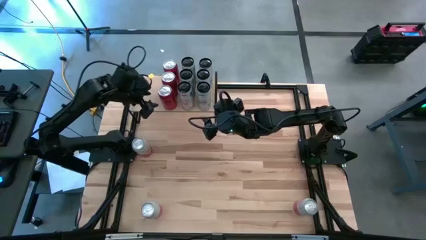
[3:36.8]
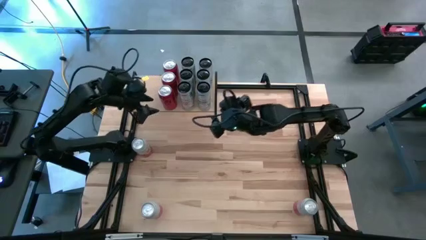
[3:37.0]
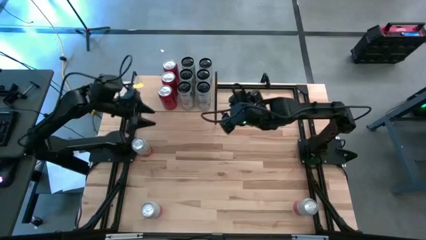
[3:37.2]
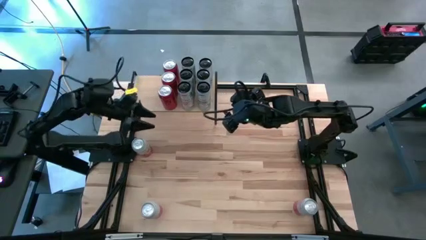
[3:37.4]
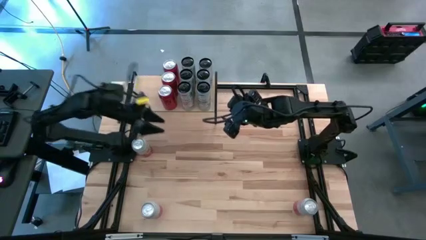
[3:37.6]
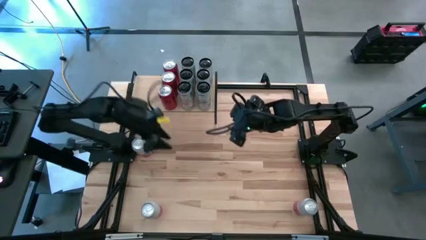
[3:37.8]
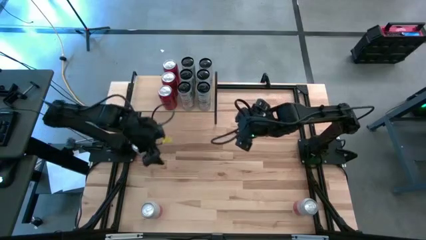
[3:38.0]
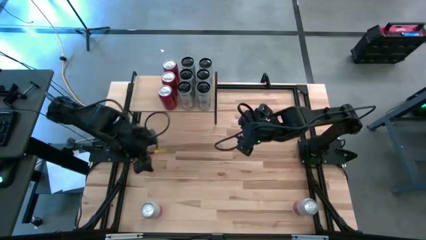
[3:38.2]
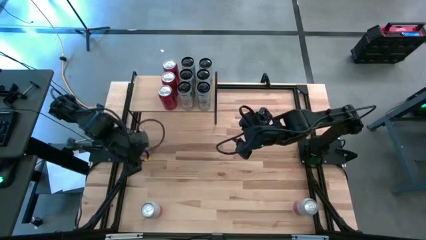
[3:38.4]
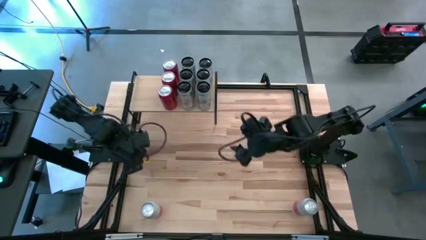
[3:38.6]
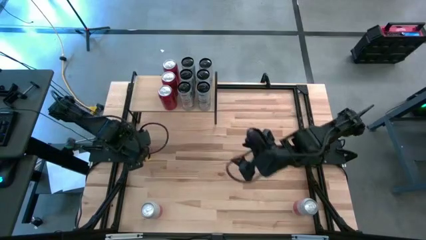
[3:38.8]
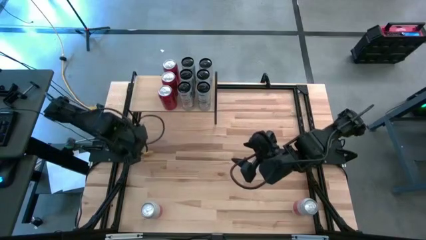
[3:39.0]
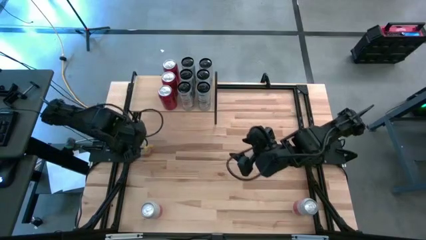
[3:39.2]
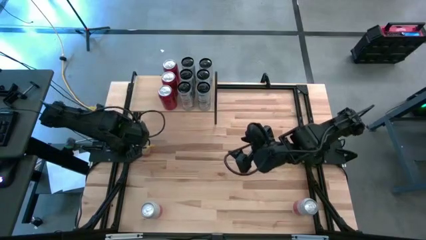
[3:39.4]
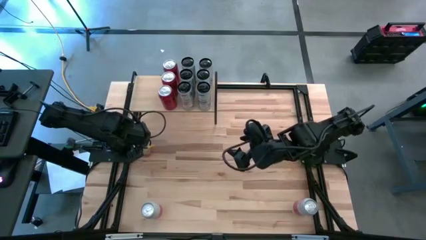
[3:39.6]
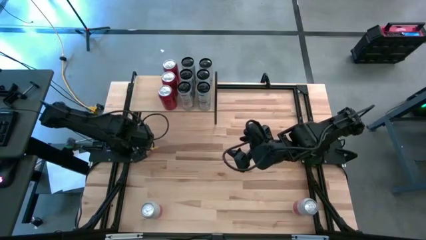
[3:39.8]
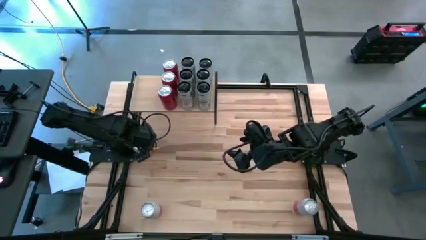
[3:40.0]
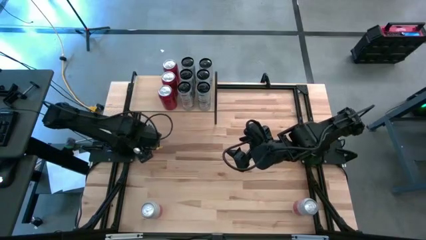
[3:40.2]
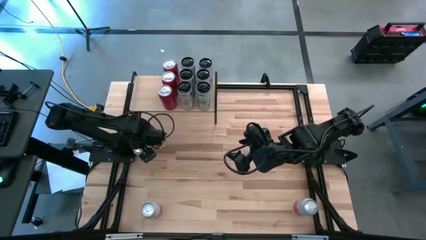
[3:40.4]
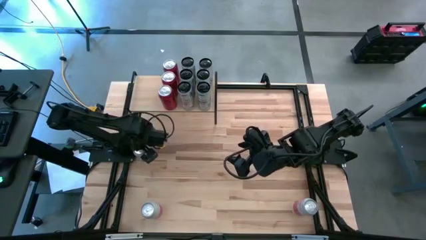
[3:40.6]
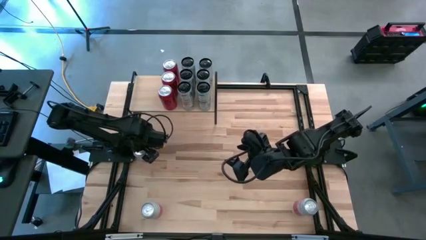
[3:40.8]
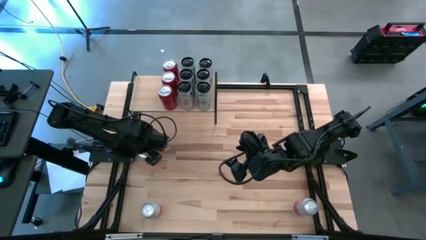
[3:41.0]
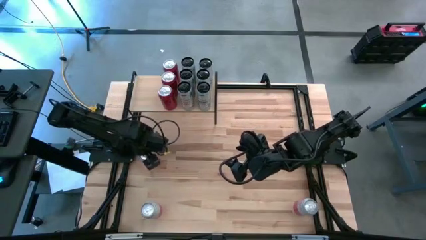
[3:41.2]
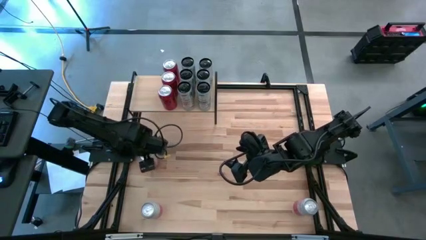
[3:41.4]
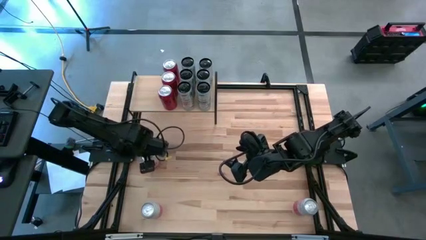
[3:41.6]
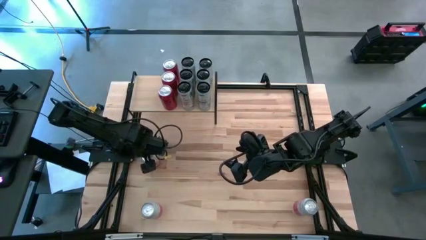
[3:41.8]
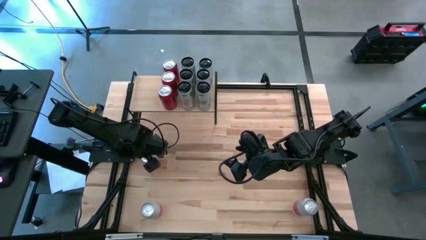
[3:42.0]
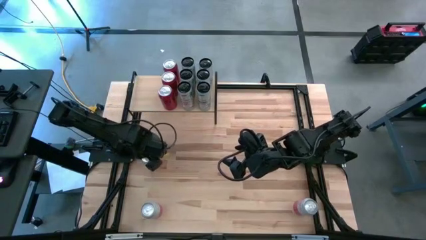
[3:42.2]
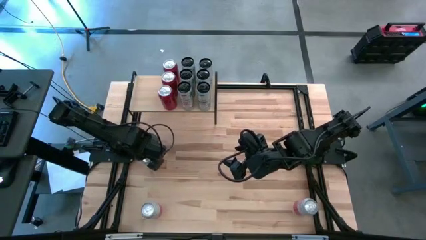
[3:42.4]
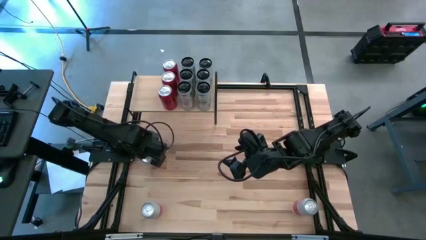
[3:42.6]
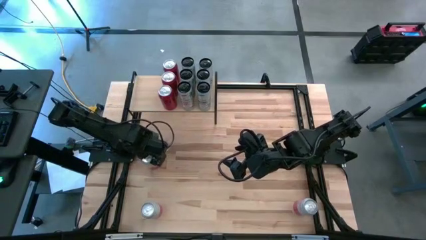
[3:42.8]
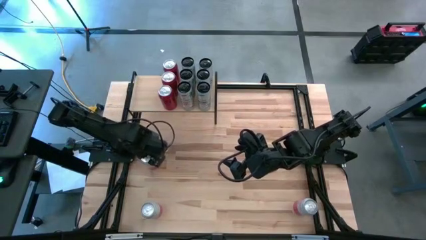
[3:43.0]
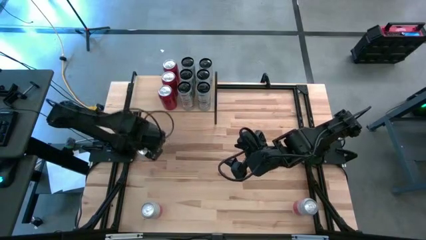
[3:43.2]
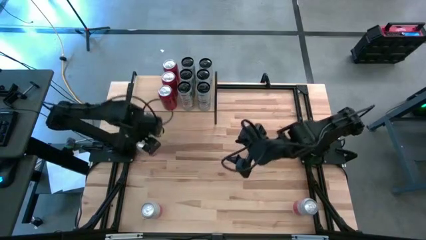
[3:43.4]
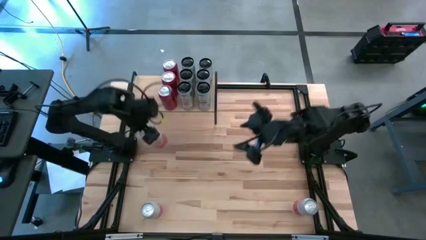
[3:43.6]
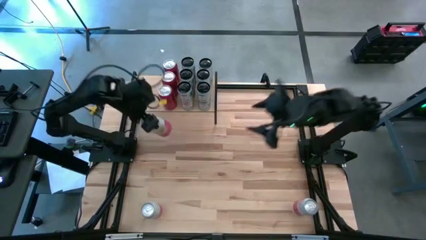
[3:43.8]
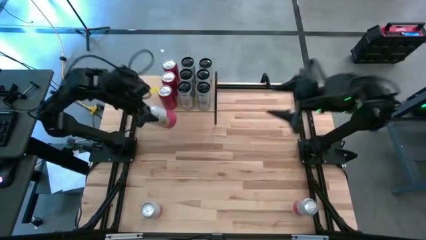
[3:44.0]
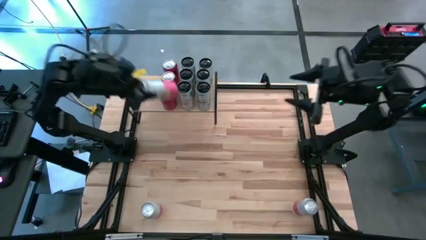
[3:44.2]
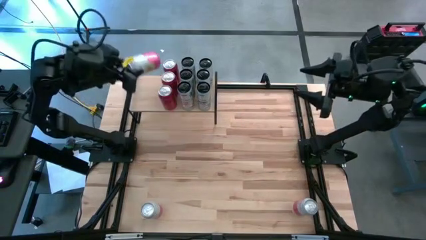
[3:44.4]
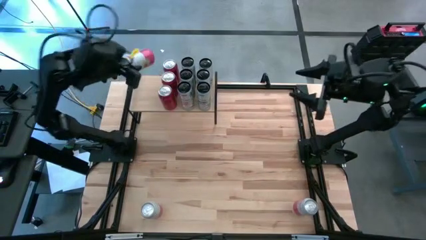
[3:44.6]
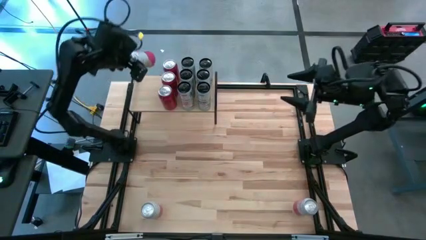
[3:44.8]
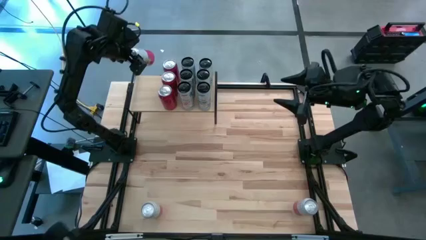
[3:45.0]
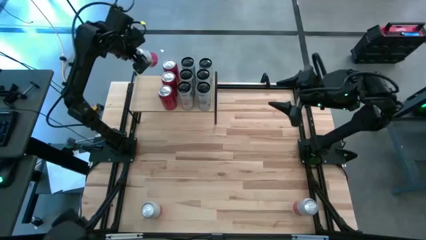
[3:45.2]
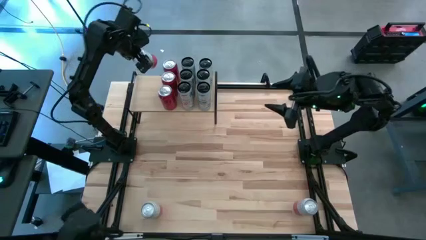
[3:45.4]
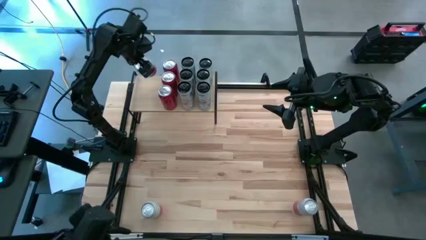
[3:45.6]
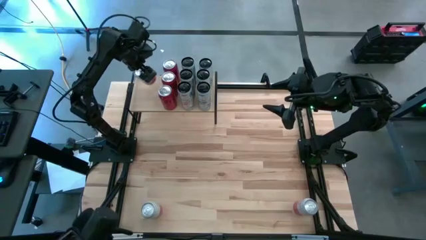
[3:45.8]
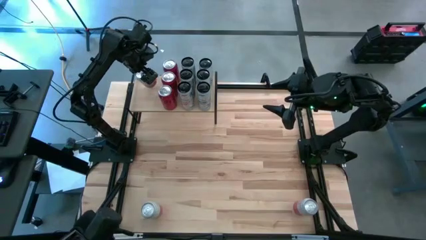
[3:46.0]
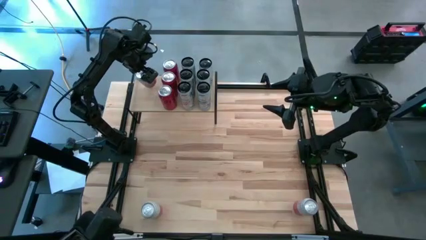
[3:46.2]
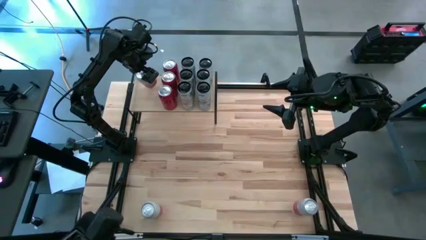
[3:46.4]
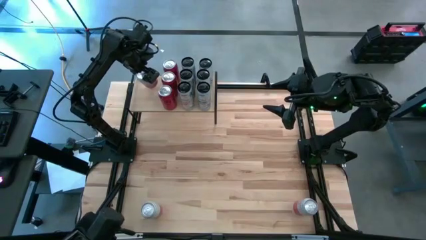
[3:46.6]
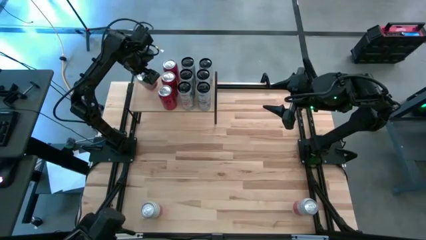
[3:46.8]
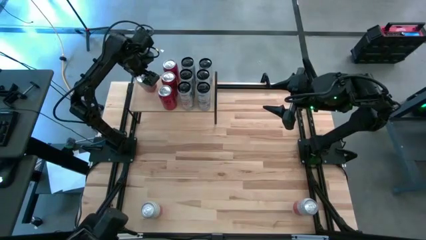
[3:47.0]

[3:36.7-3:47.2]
Task: Place canned beverage on shelf
Put the top pink soda can on the shelf
